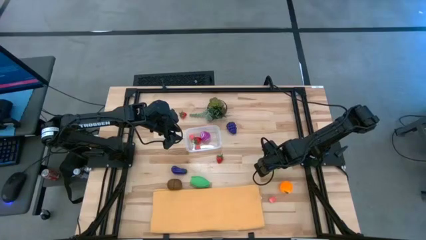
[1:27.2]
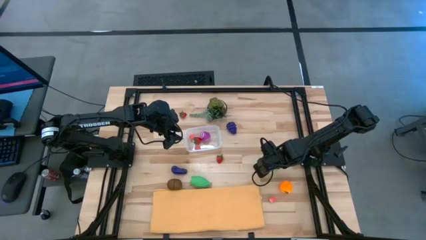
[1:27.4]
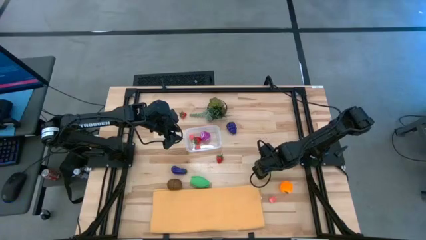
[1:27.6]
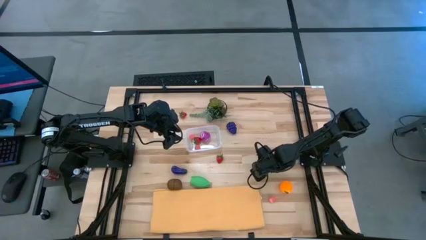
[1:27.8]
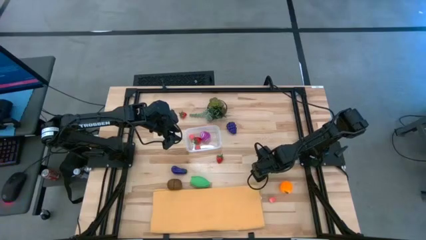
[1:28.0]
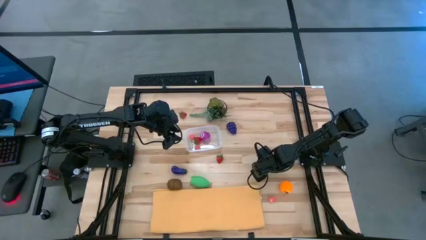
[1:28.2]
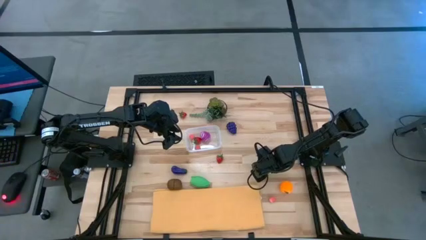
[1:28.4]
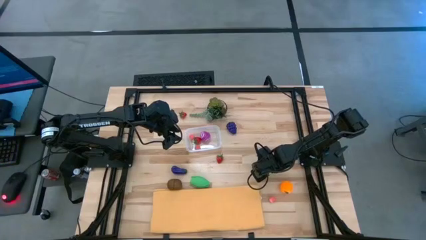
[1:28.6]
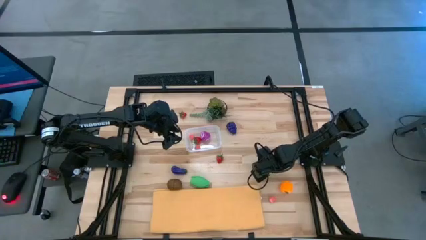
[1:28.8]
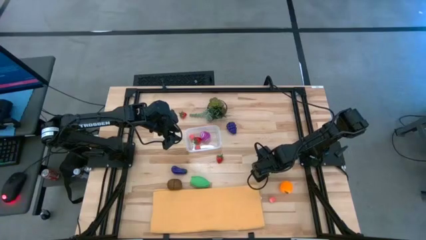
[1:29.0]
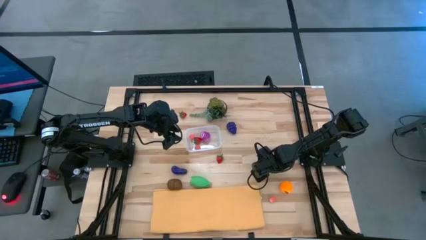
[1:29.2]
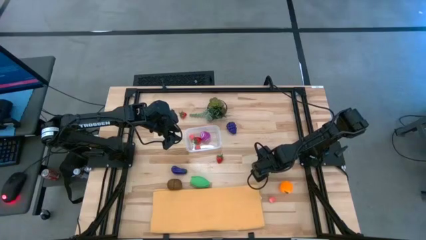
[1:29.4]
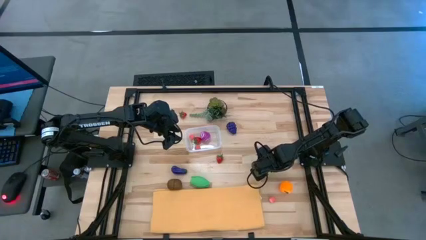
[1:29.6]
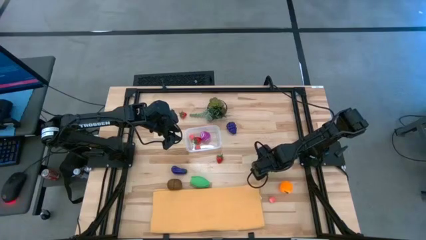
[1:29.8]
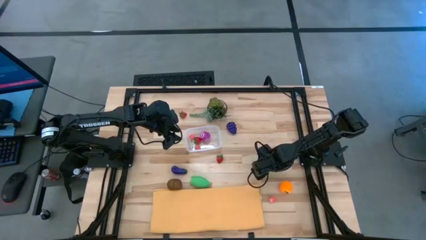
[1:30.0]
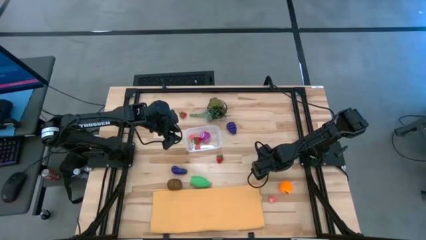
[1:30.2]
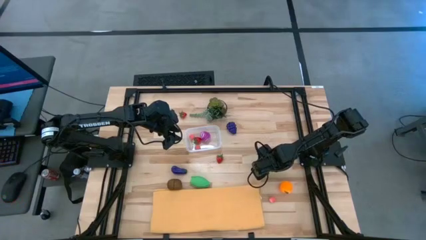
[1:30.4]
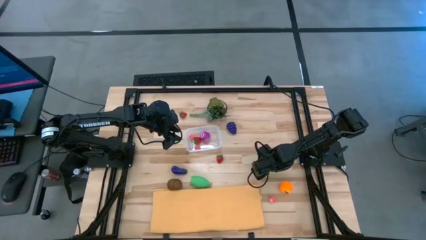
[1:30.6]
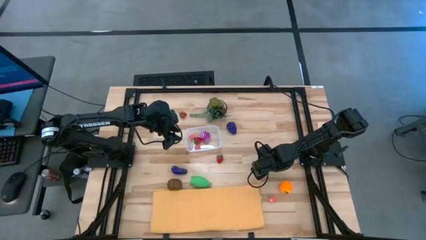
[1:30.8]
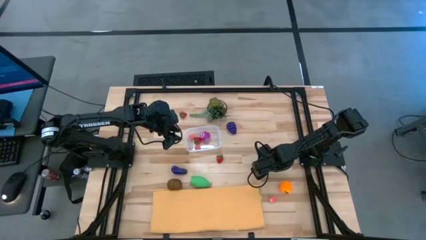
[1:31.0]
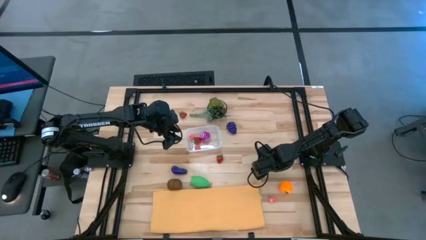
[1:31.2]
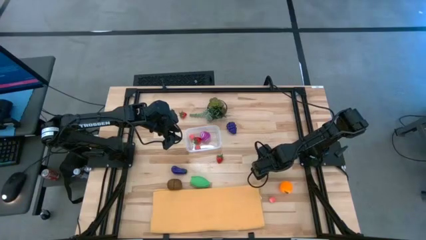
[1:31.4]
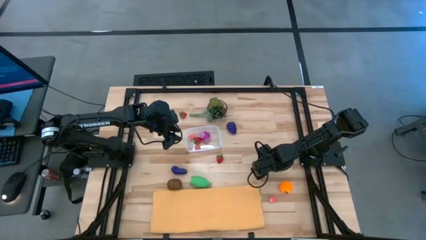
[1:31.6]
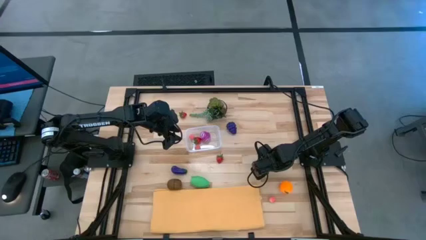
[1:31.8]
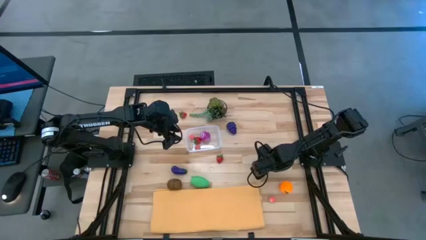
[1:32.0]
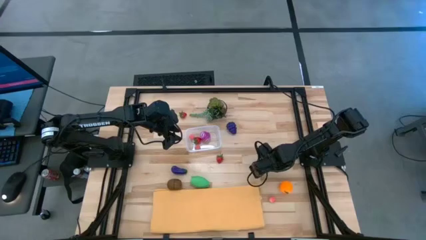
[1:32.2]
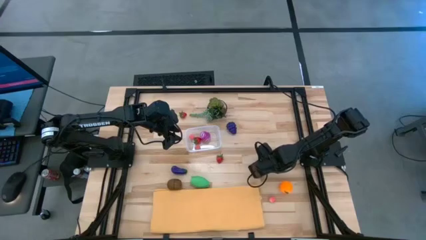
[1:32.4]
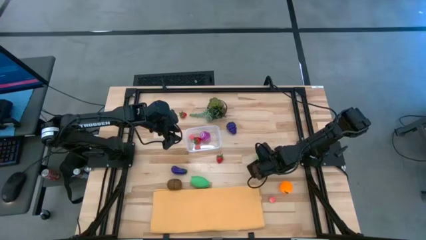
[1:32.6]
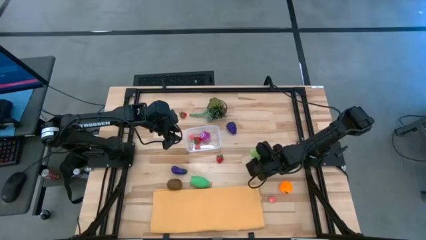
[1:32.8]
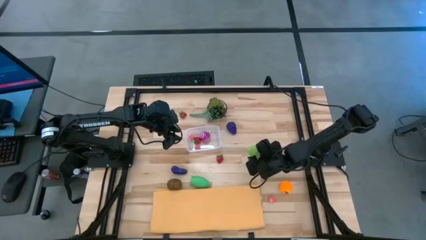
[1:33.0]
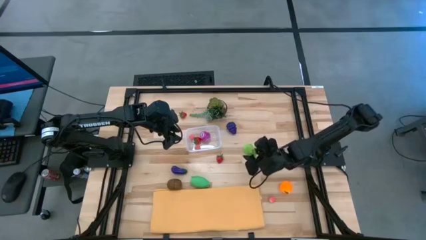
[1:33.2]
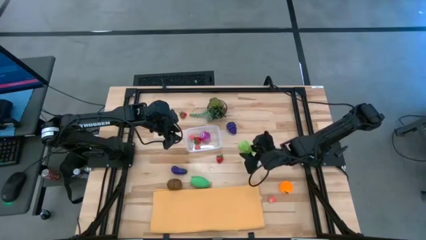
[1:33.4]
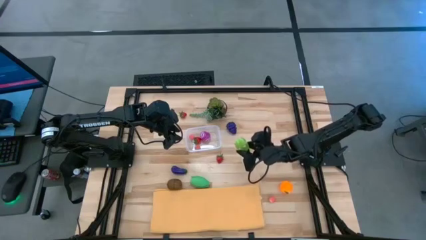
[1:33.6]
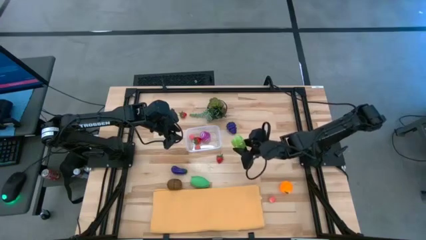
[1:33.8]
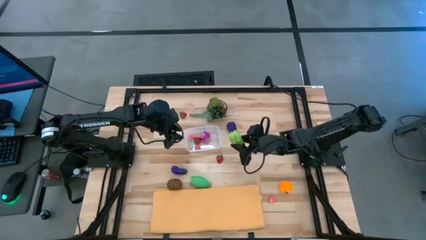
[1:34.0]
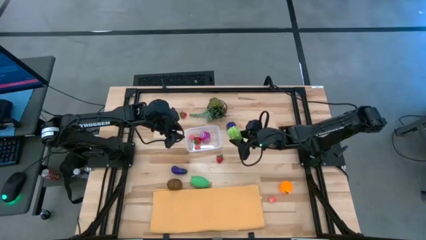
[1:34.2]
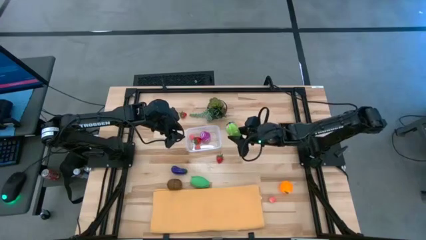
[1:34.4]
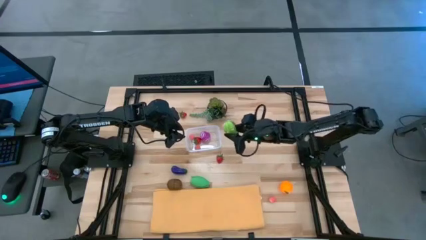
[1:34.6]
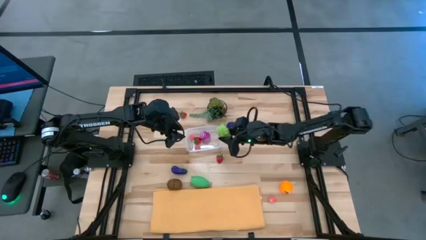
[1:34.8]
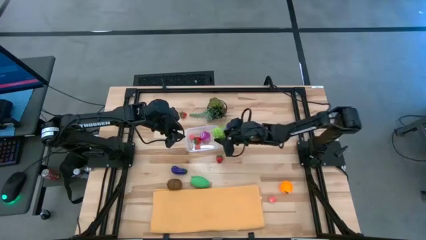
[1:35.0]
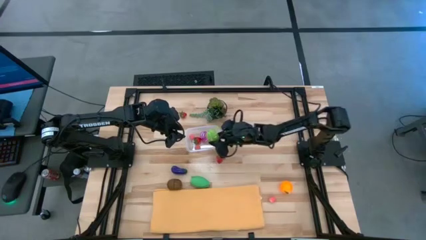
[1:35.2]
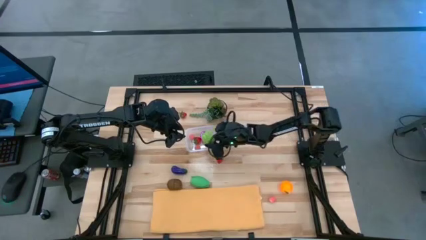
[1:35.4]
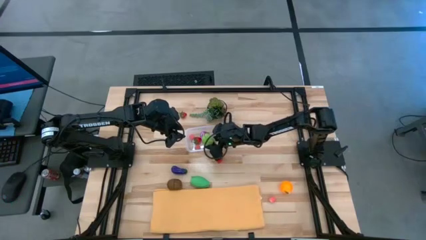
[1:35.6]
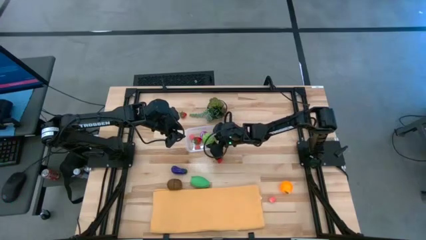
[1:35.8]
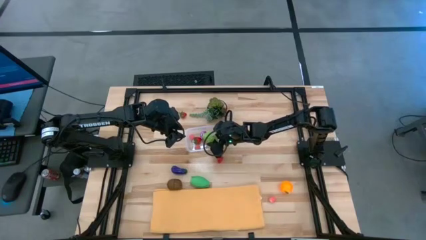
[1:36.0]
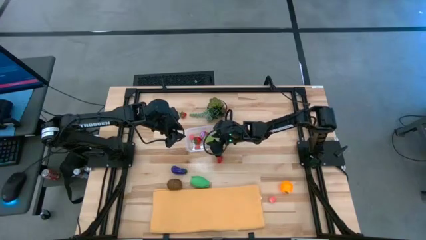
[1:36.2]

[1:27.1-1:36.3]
Task: Pick and placing Produce into tupperware
Put the green starfruit into the transparent bin

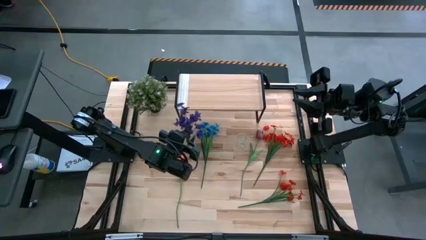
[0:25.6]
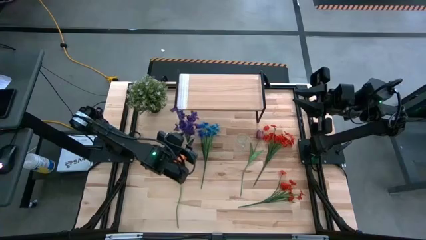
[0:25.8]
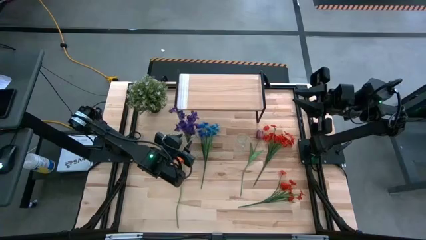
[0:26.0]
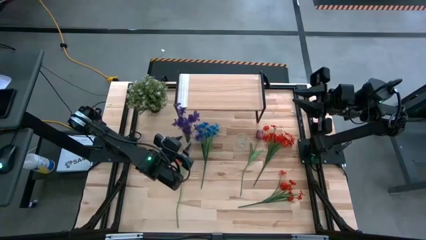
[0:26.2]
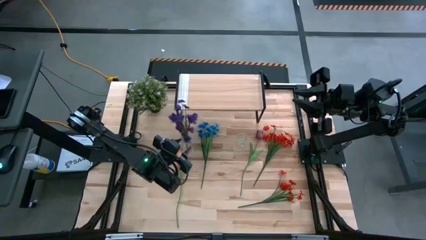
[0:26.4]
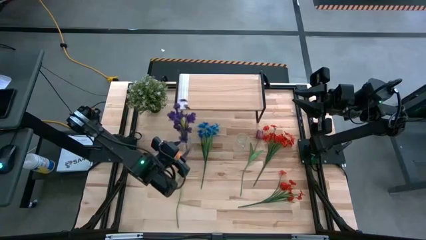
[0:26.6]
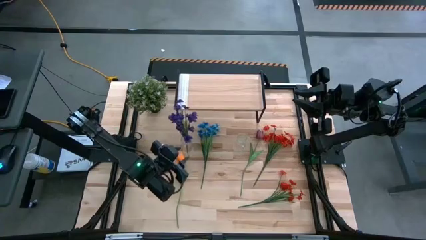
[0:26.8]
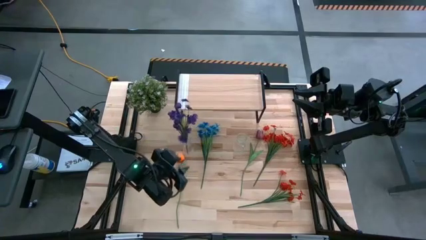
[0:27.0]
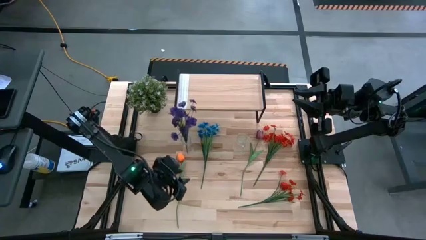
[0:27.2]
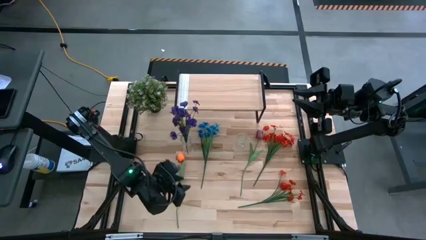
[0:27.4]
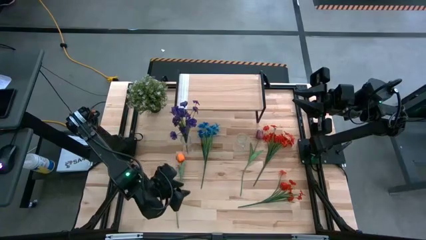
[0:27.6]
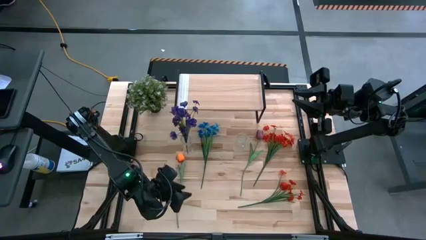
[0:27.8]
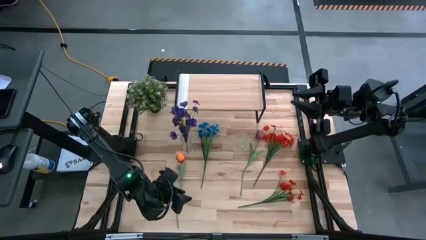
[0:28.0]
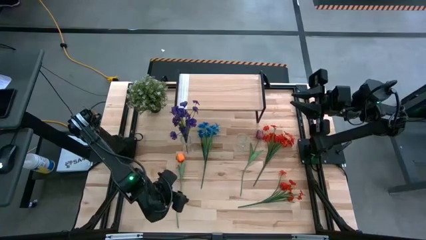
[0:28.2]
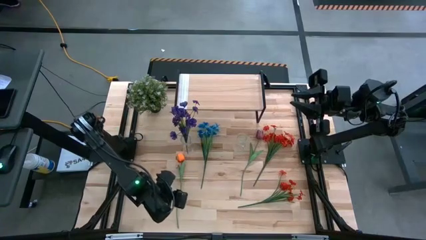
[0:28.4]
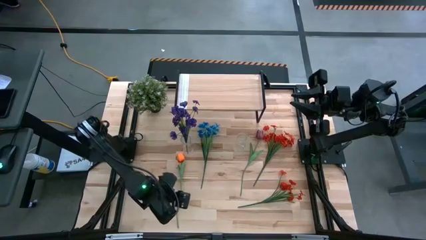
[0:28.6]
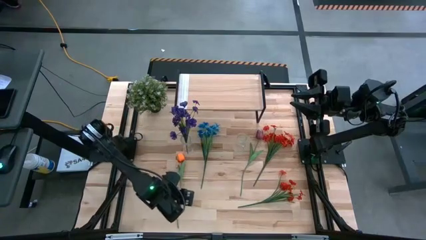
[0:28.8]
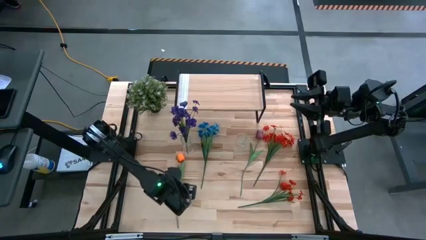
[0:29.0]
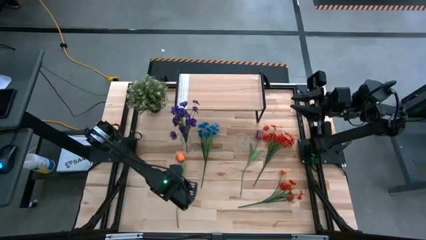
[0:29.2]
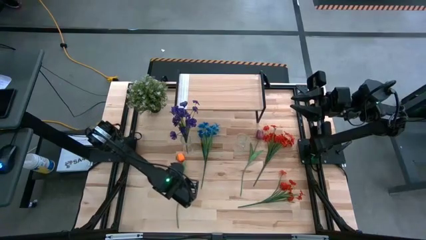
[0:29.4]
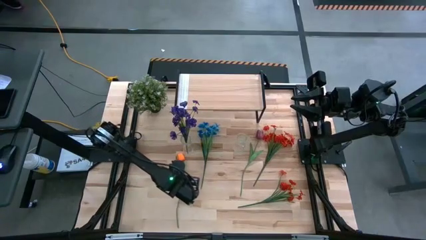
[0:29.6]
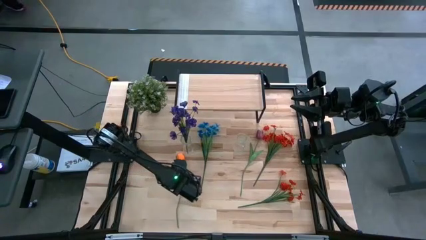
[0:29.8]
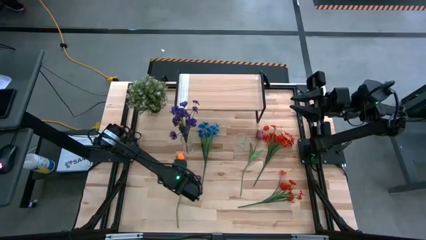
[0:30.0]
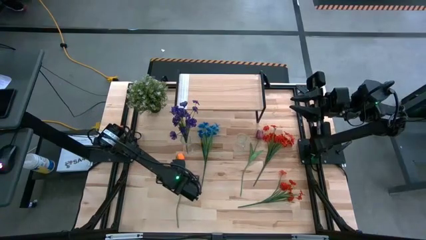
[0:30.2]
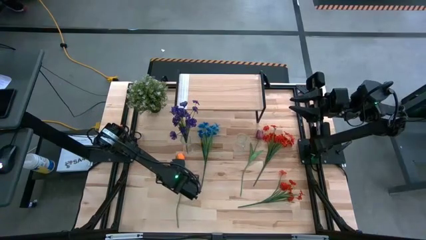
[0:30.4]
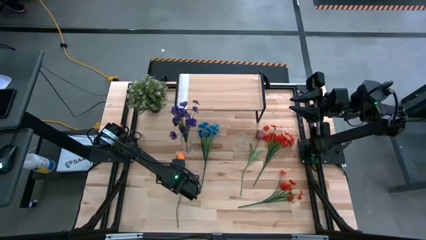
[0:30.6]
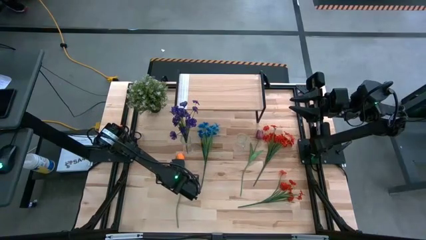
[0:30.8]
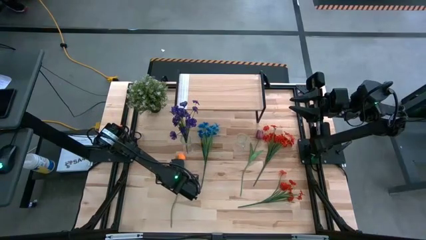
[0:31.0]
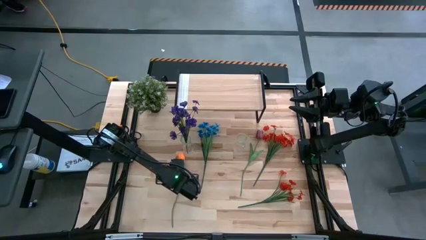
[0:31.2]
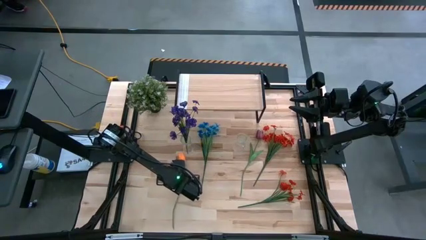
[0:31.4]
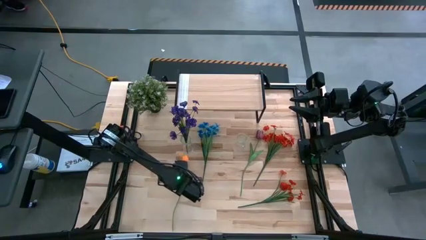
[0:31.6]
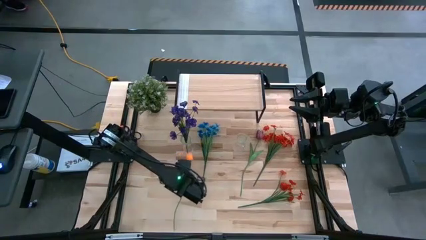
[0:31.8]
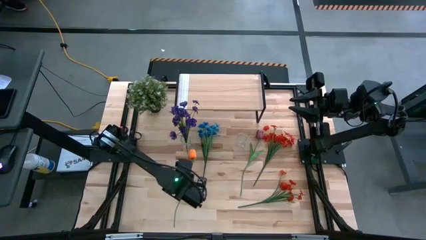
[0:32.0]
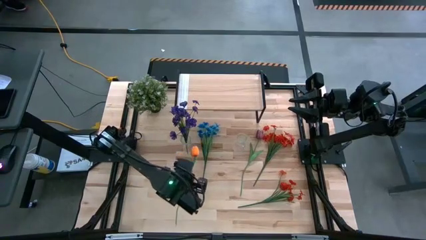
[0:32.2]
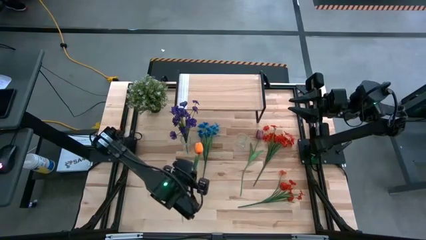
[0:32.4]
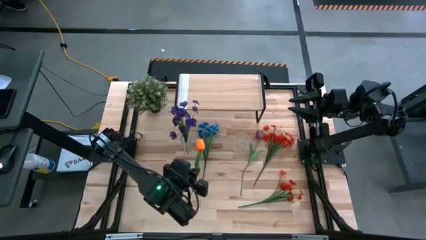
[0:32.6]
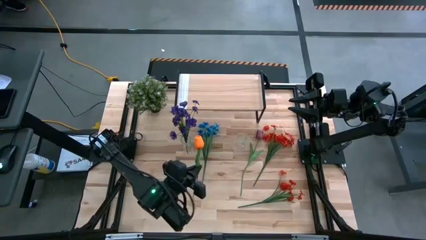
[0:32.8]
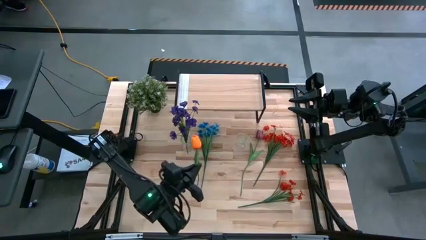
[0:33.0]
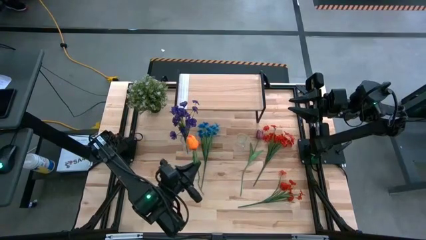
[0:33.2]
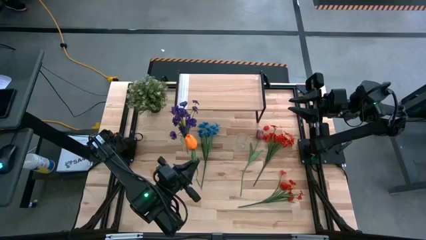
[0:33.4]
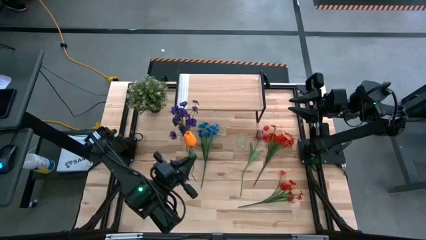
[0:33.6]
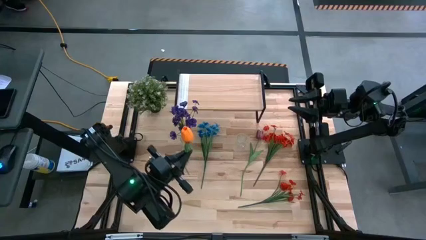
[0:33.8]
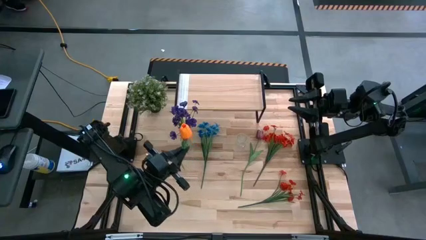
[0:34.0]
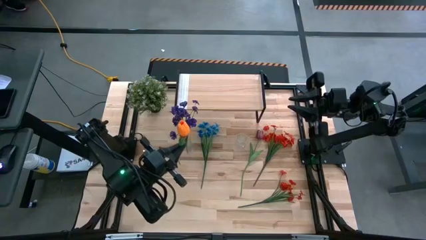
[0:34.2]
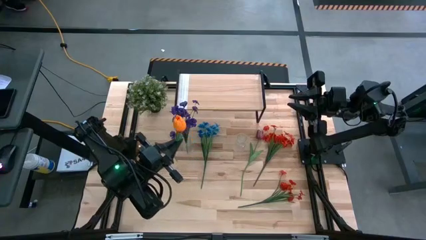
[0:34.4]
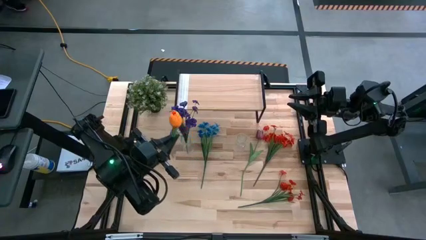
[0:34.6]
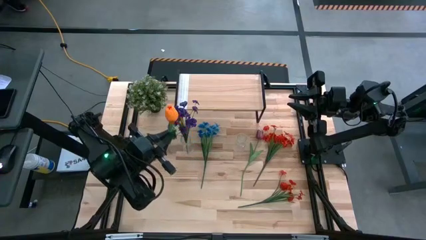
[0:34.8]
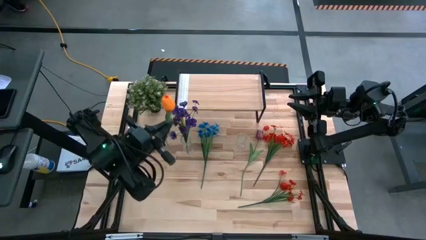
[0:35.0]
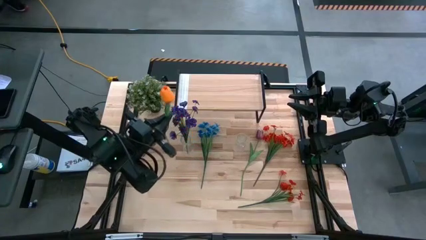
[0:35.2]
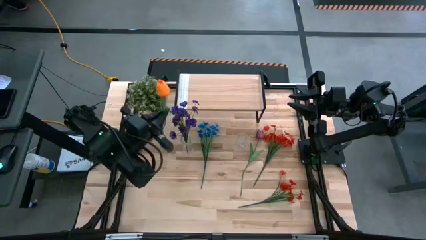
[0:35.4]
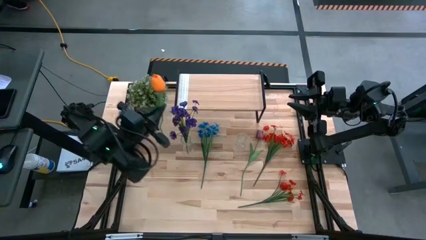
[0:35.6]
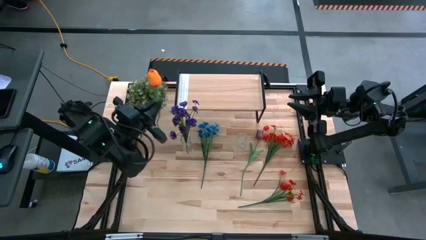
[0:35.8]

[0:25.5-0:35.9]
Task: Pick and place flowers into a vace then onto a shelf
Put the orange tulip into the left transparent vase
